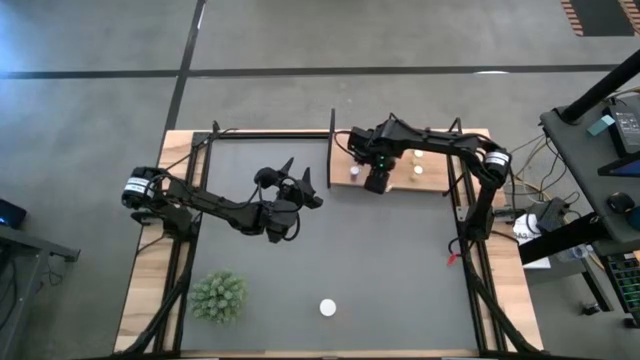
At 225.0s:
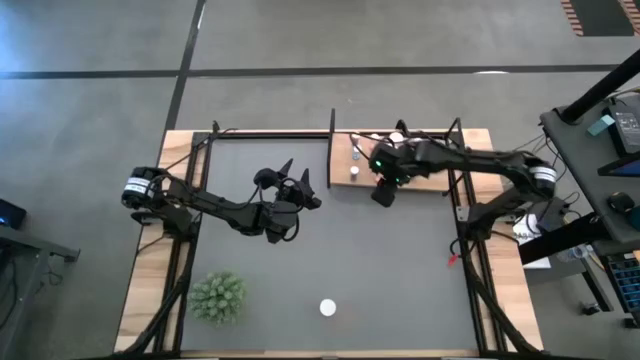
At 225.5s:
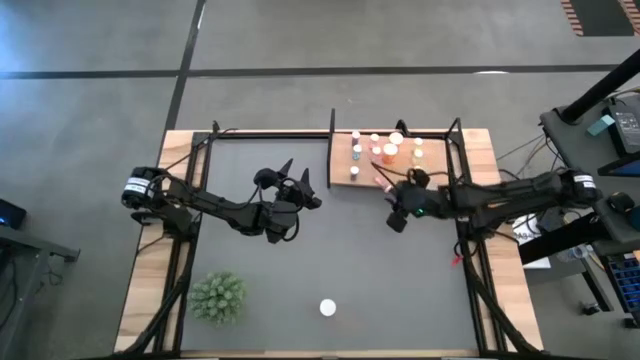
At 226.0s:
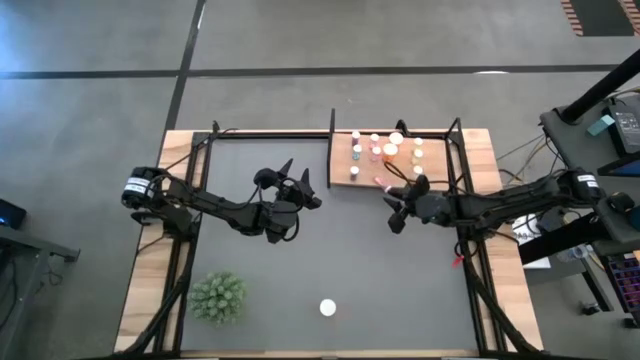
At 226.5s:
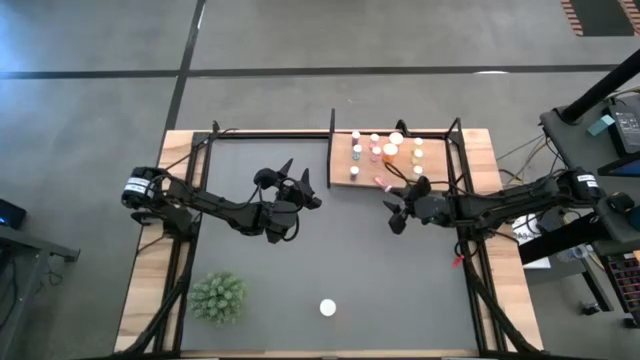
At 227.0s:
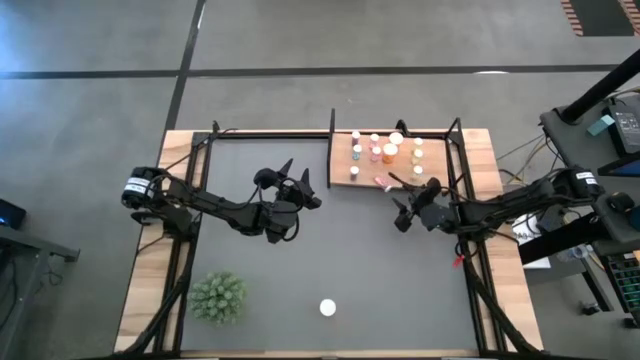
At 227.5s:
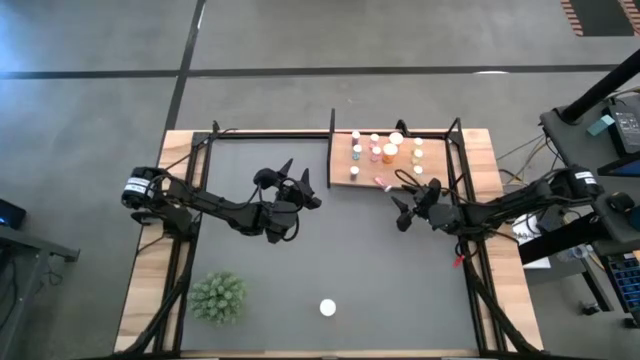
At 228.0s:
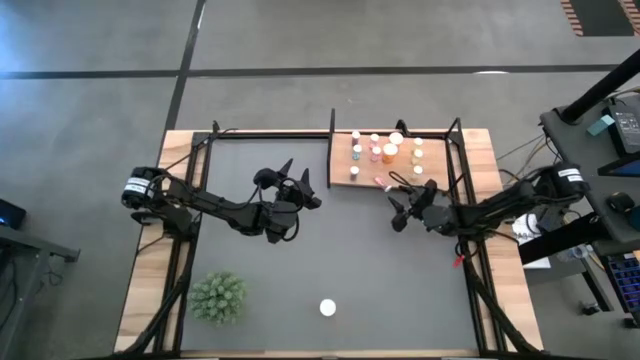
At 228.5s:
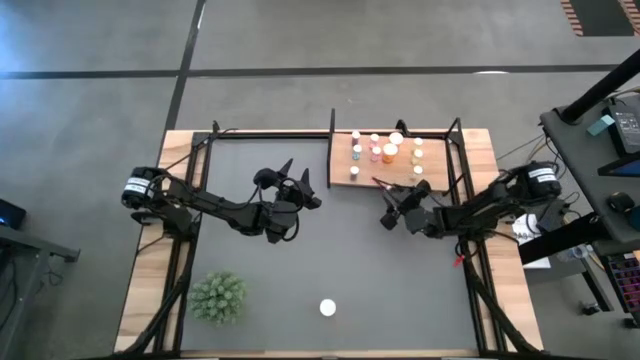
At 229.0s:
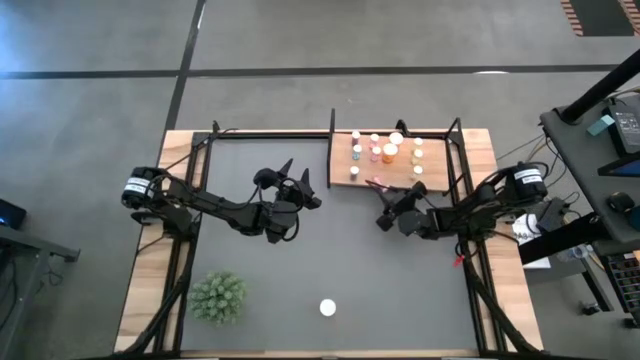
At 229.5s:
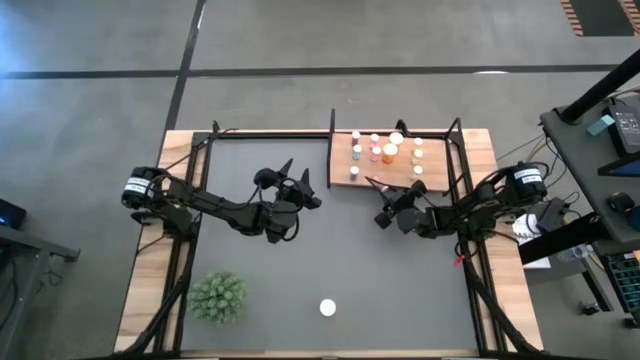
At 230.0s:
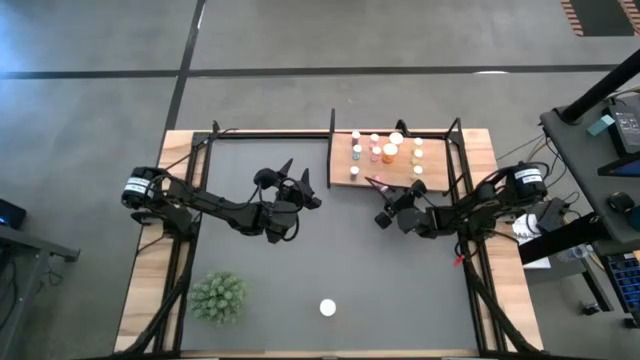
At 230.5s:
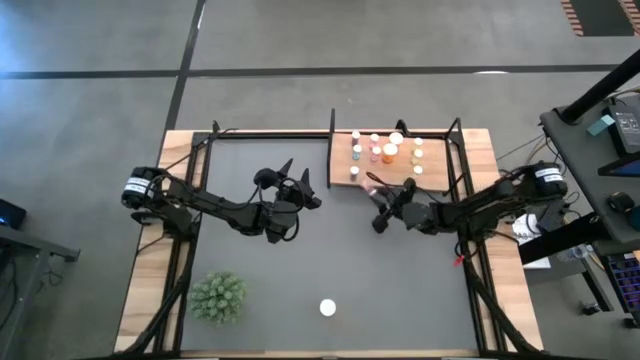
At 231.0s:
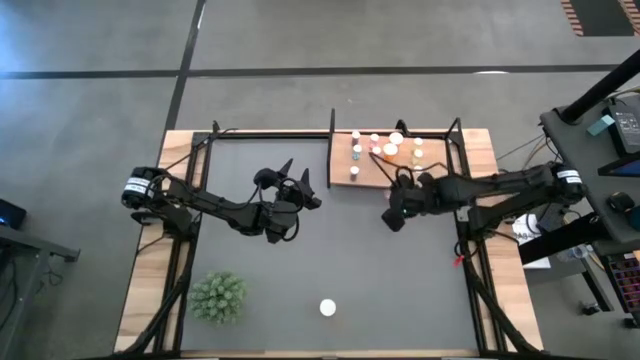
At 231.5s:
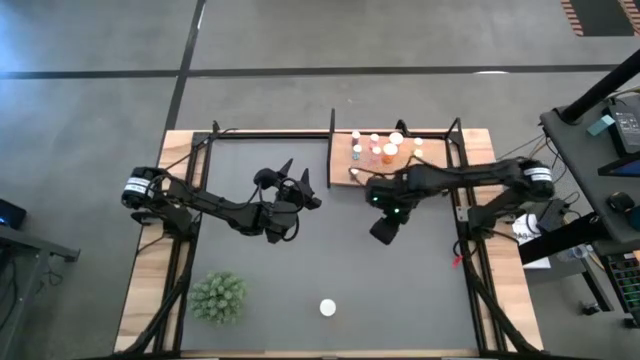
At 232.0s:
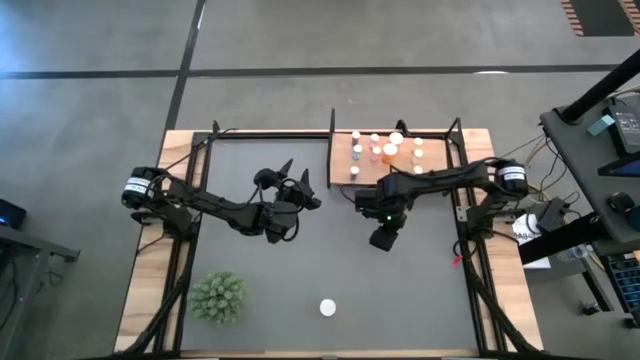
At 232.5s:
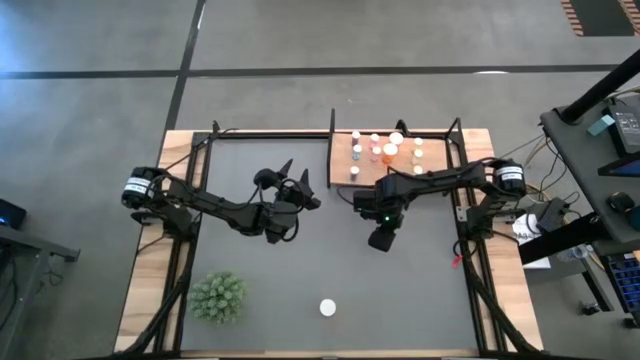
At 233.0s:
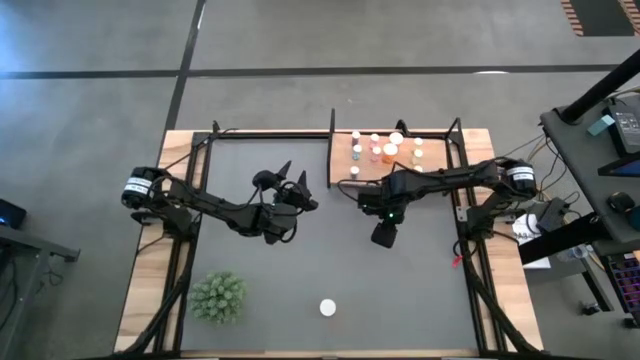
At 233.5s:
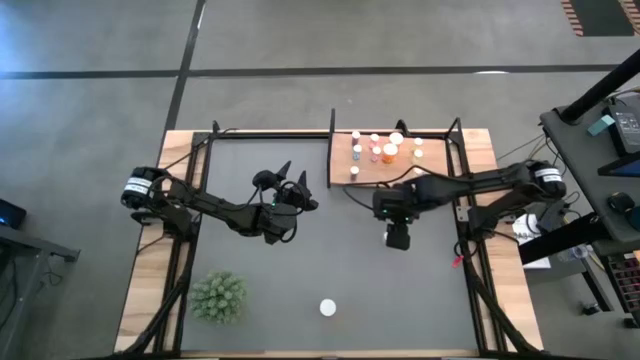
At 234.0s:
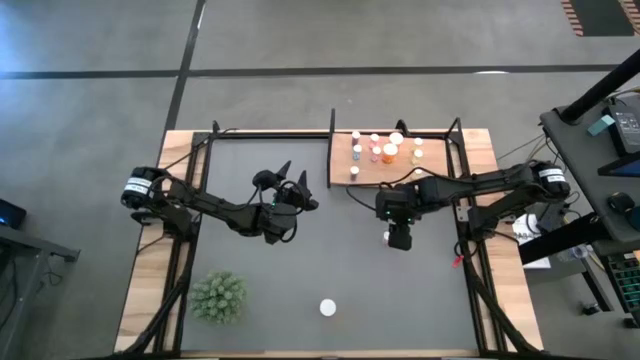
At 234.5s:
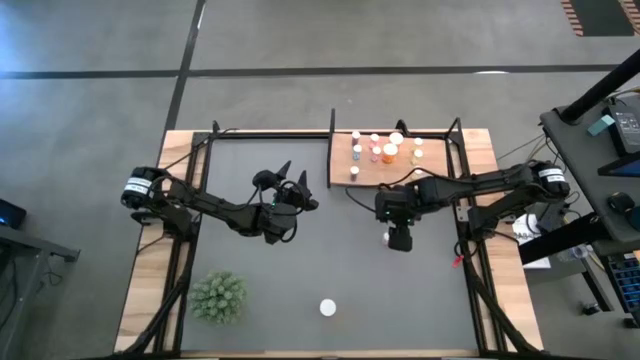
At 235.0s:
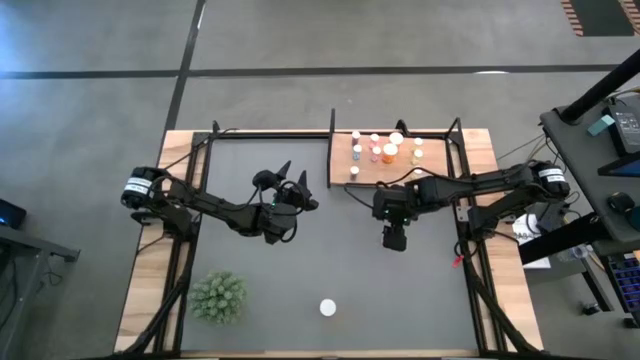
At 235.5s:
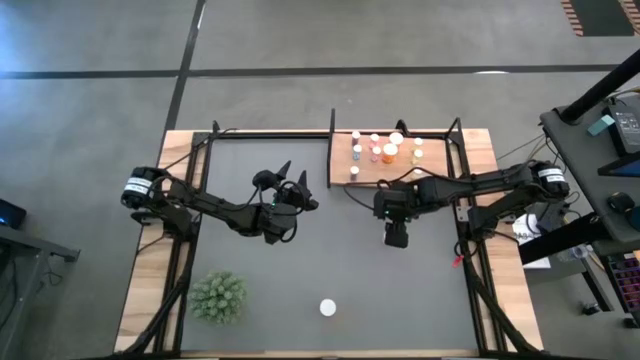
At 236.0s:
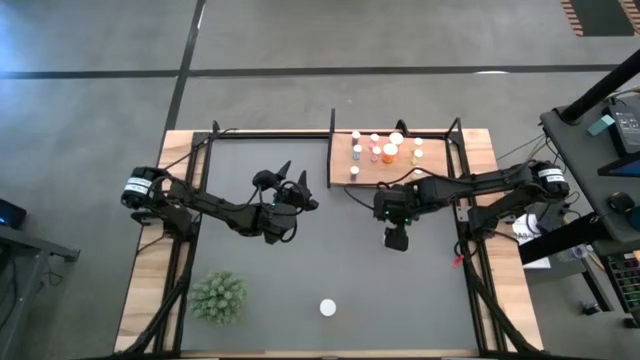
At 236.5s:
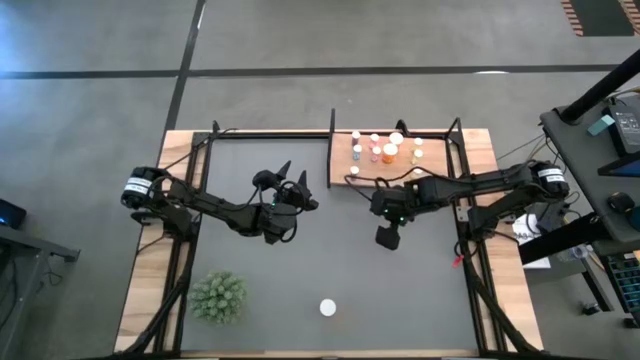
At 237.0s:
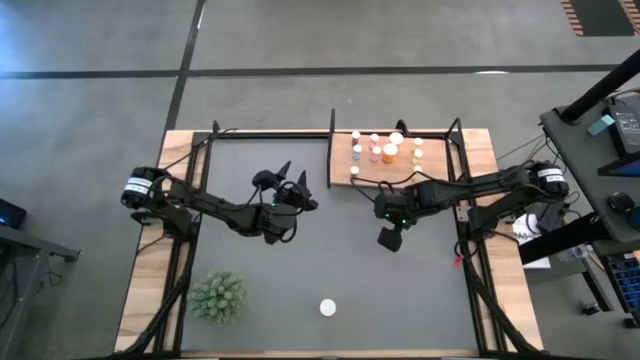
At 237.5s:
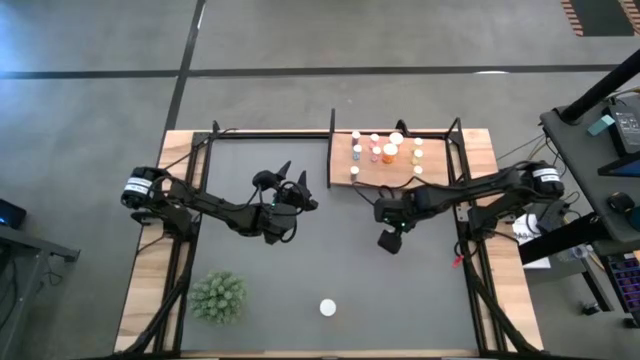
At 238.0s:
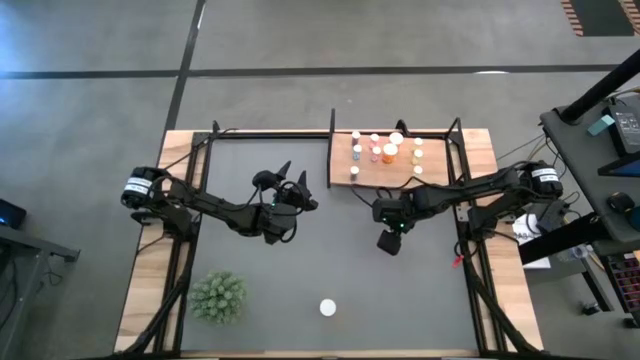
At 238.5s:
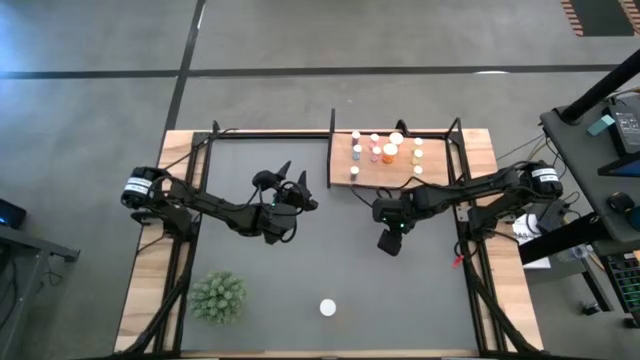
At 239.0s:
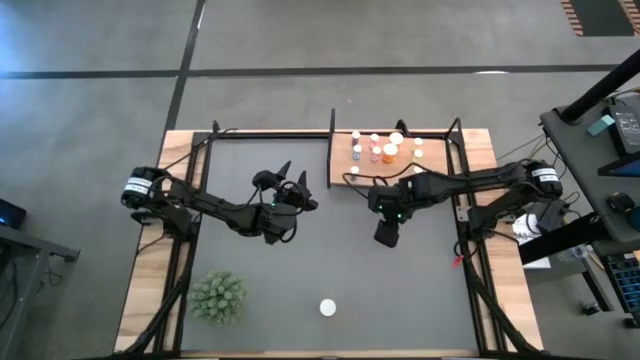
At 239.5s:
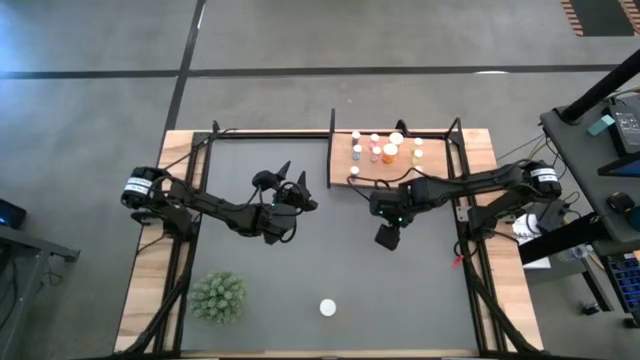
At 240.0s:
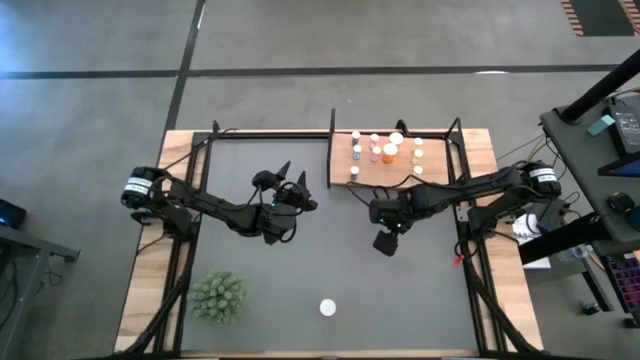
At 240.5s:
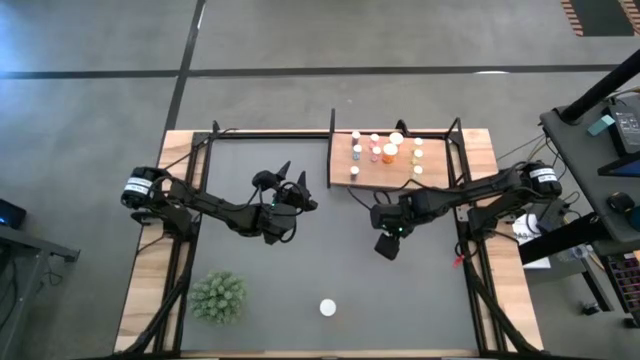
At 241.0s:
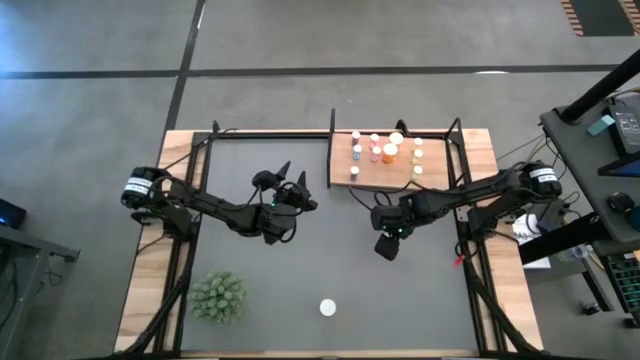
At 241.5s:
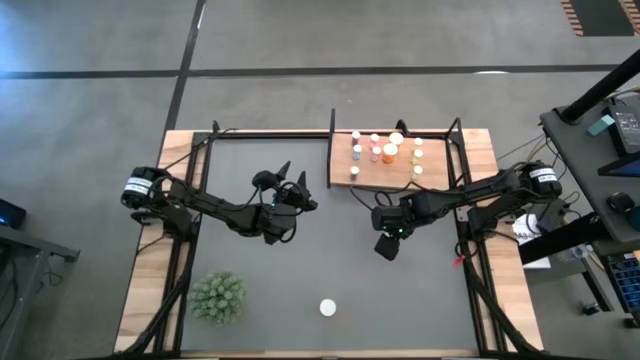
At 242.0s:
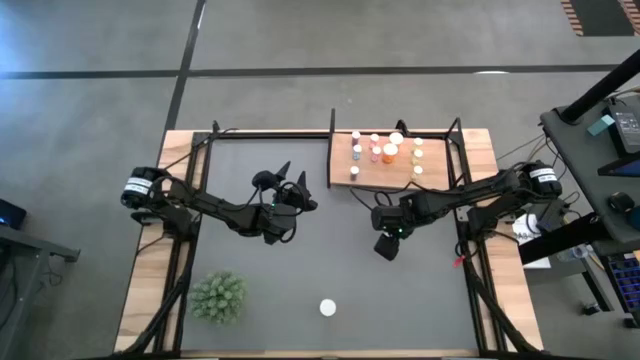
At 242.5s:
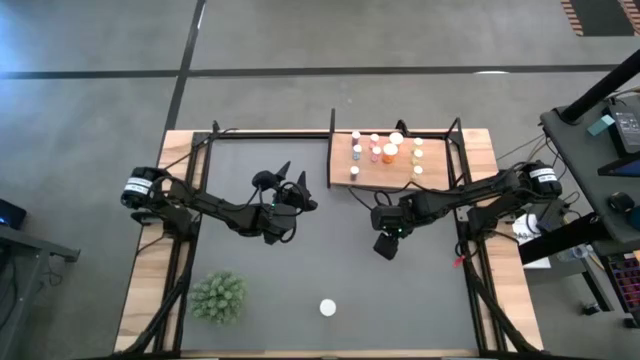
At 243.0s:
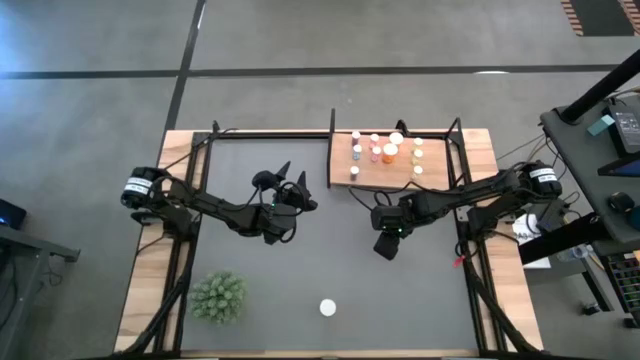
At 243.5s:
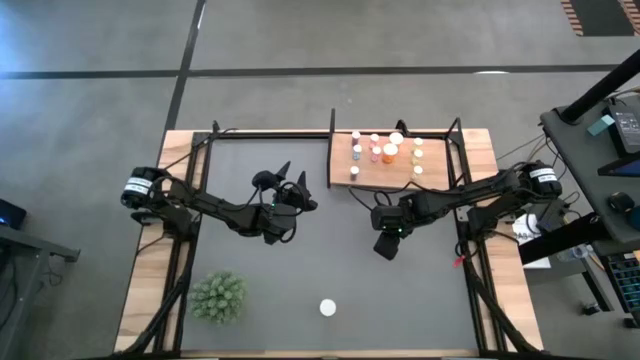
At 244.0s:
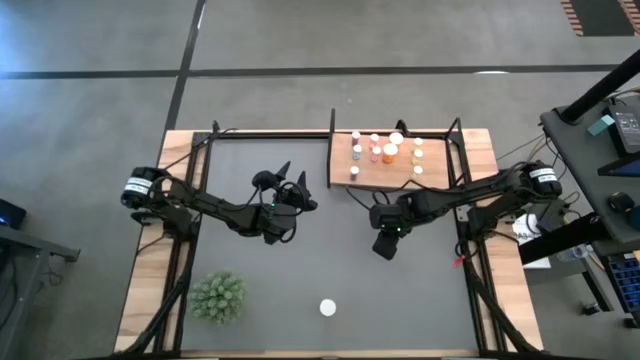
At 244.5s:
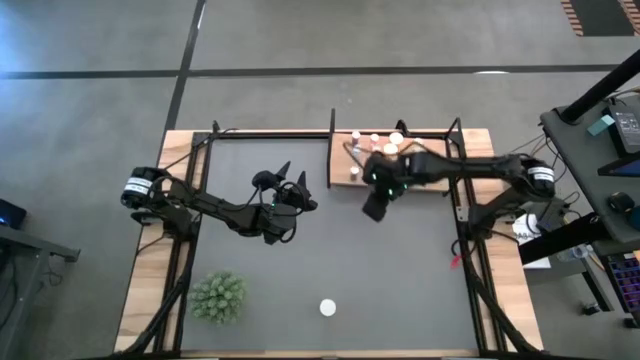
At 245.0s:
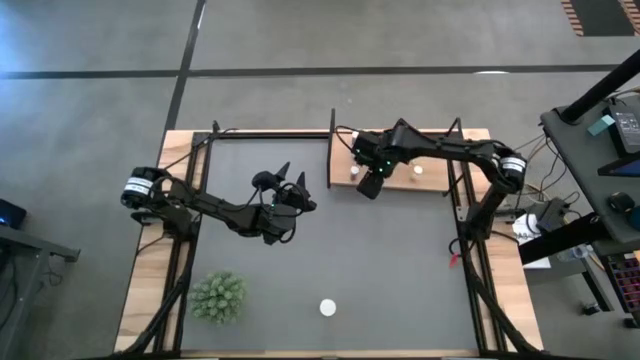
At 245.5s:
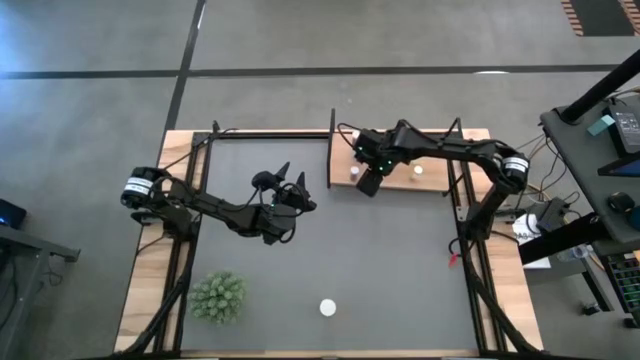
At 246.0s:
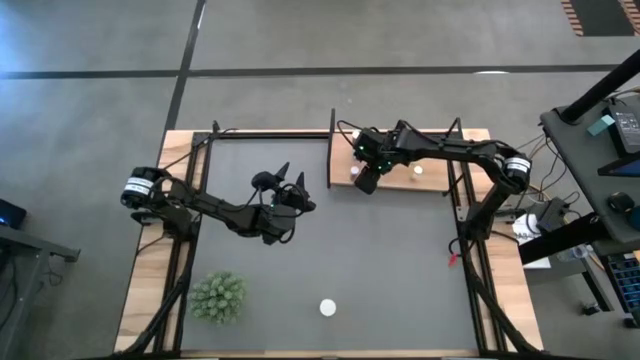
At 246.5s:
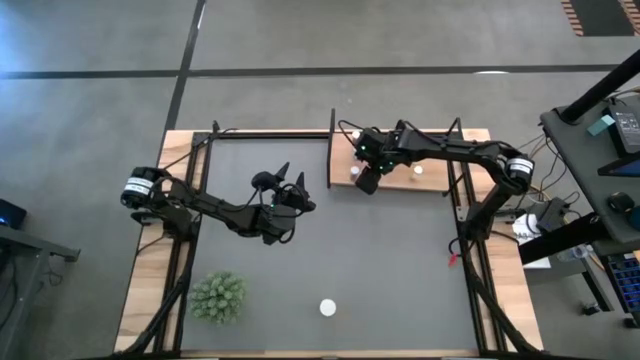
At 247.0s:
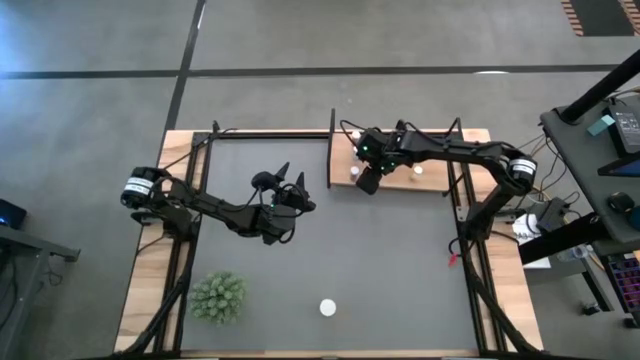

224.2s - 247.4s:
Task: Pick and place medicine bottles onto shelf by color
Put the pink pill bottle on the shelf aligned with the other pink pill bottles
